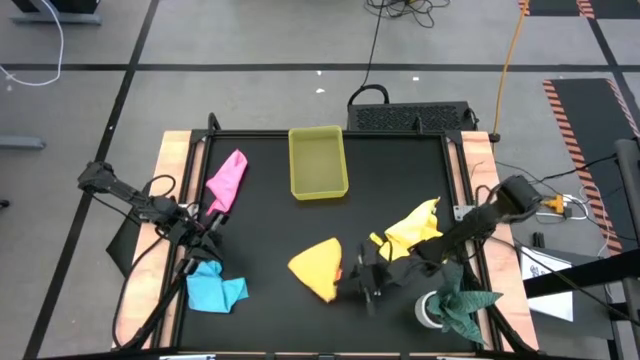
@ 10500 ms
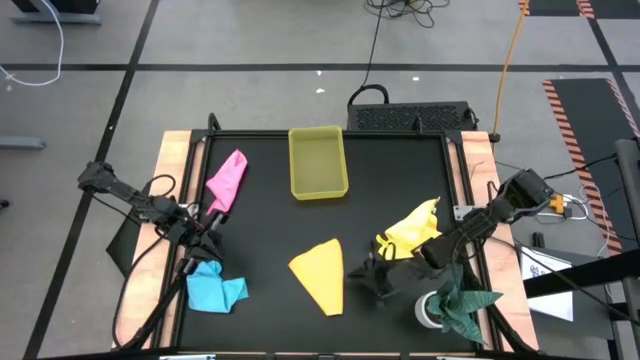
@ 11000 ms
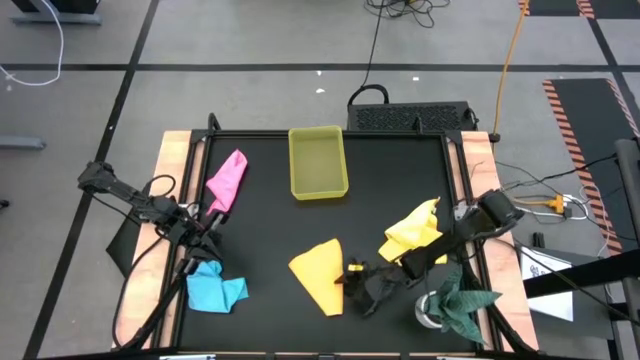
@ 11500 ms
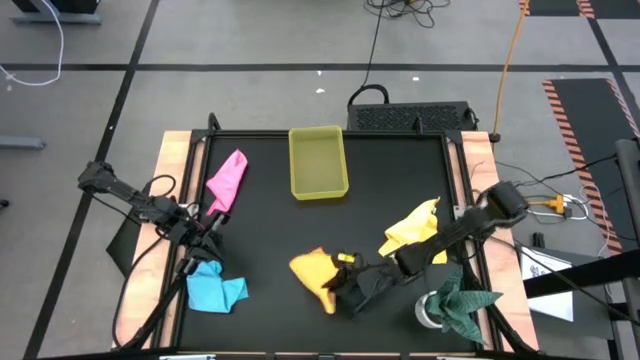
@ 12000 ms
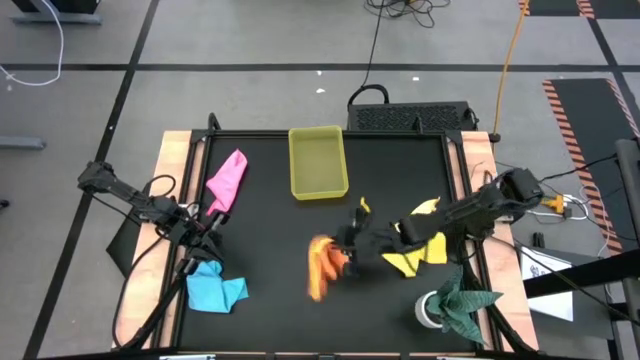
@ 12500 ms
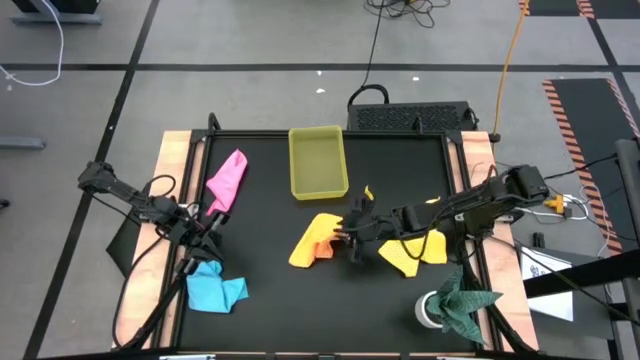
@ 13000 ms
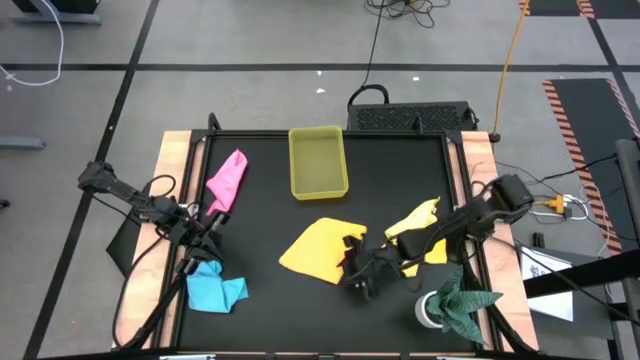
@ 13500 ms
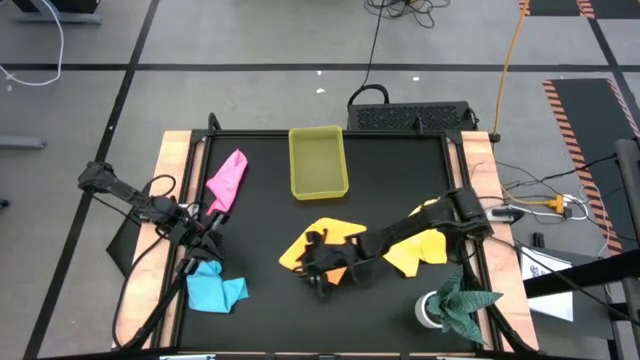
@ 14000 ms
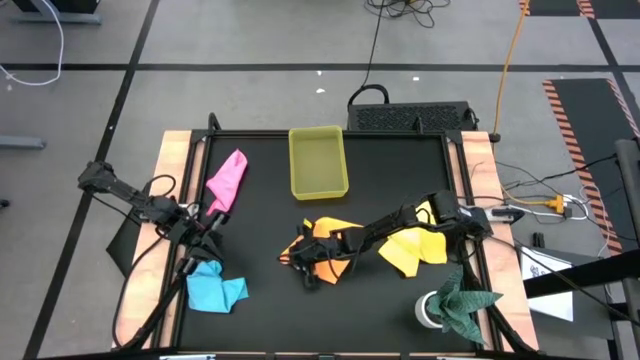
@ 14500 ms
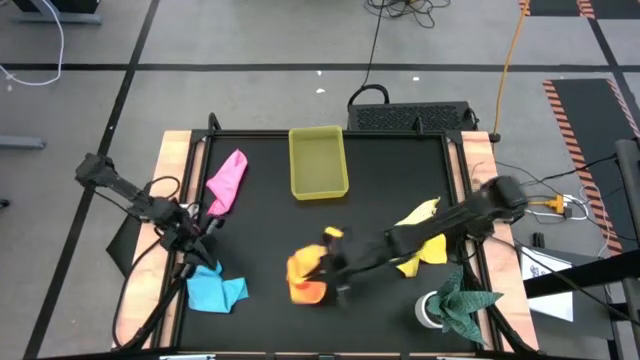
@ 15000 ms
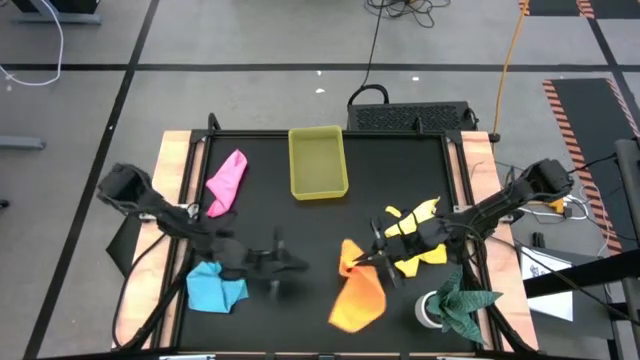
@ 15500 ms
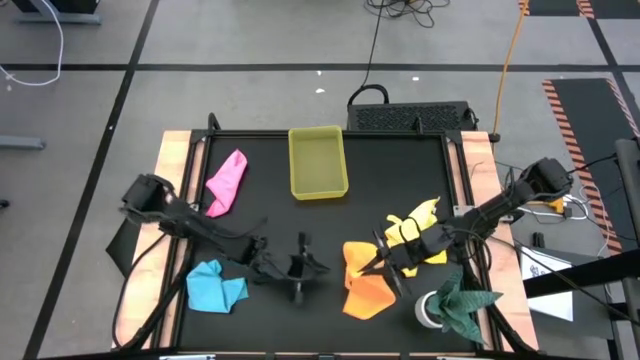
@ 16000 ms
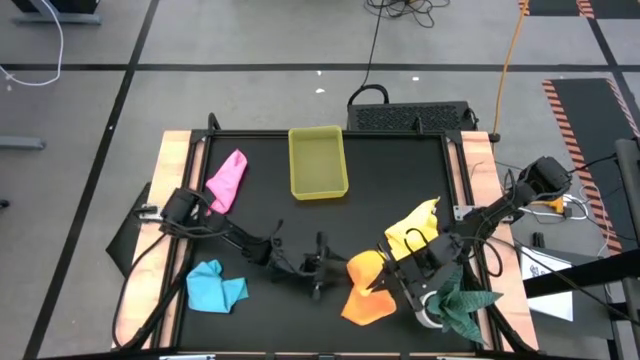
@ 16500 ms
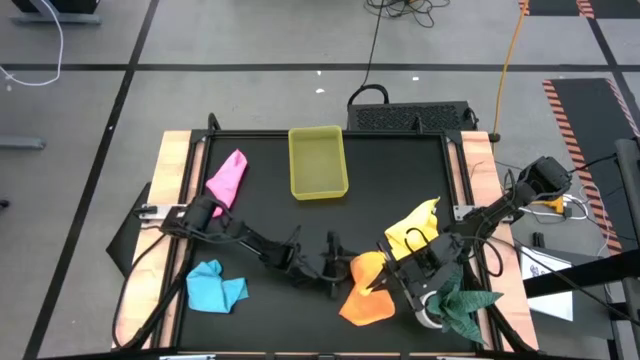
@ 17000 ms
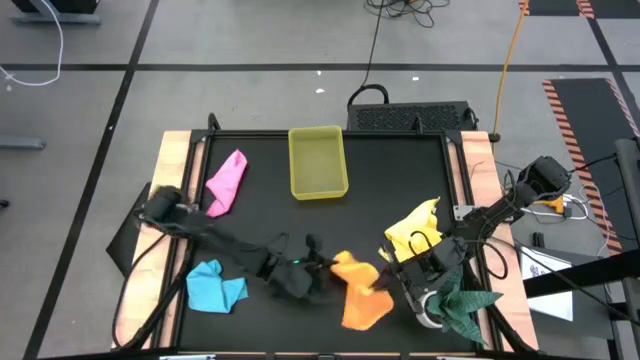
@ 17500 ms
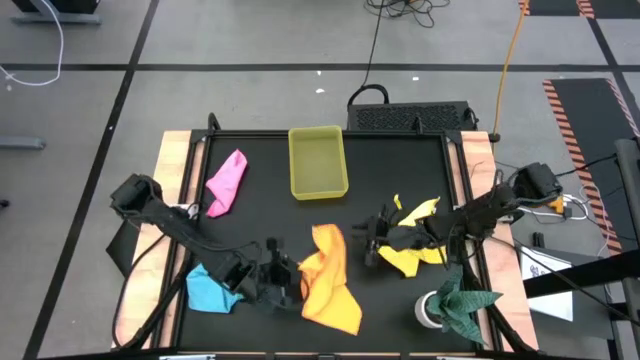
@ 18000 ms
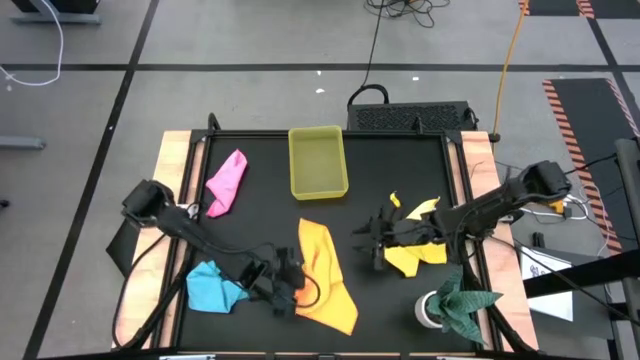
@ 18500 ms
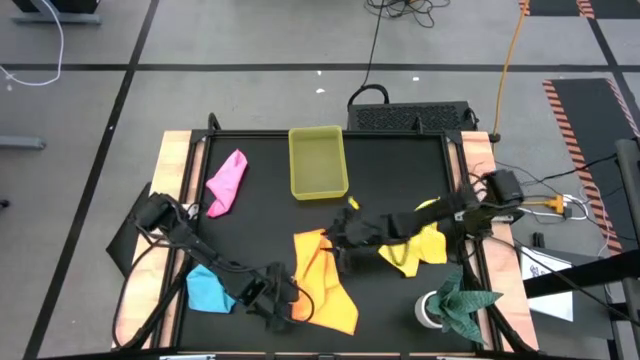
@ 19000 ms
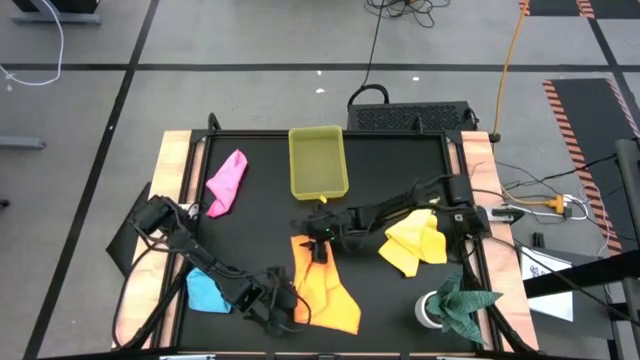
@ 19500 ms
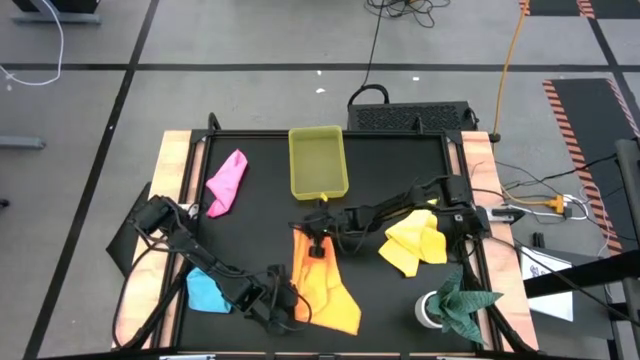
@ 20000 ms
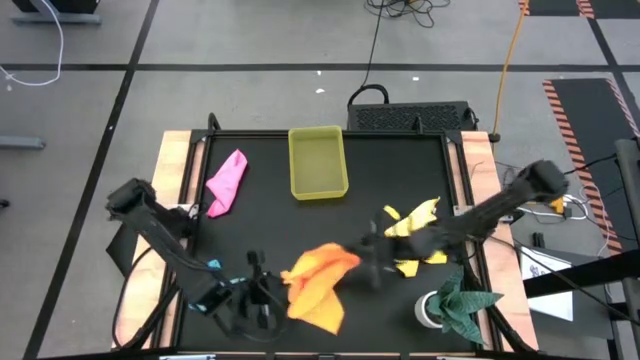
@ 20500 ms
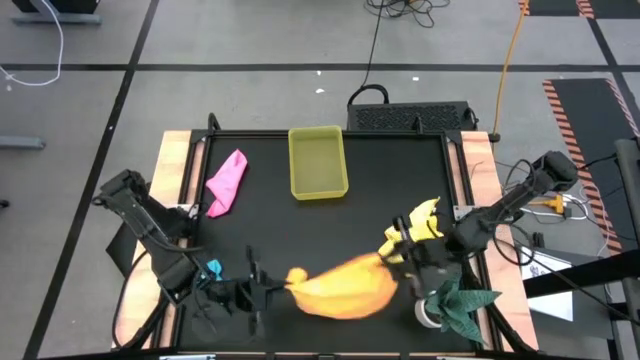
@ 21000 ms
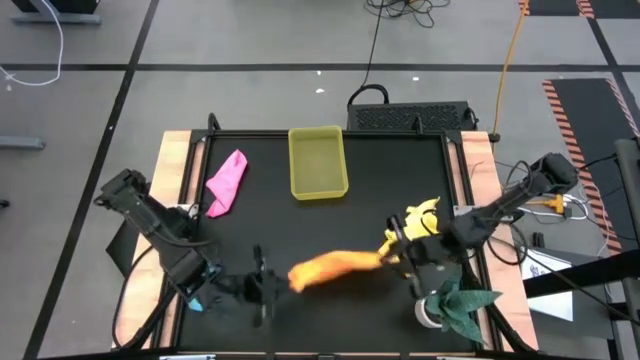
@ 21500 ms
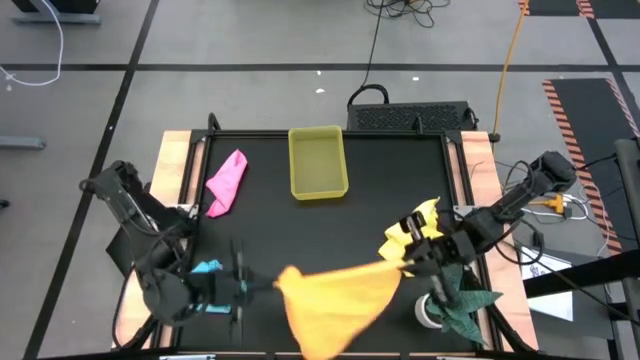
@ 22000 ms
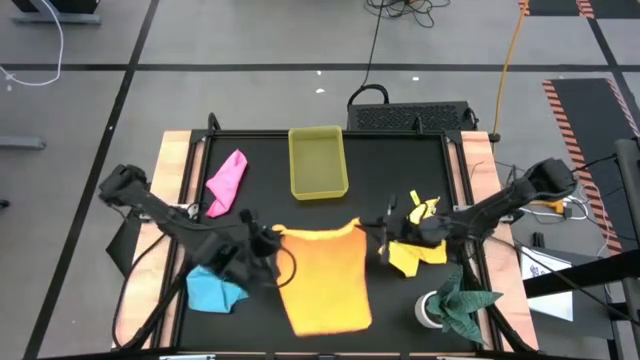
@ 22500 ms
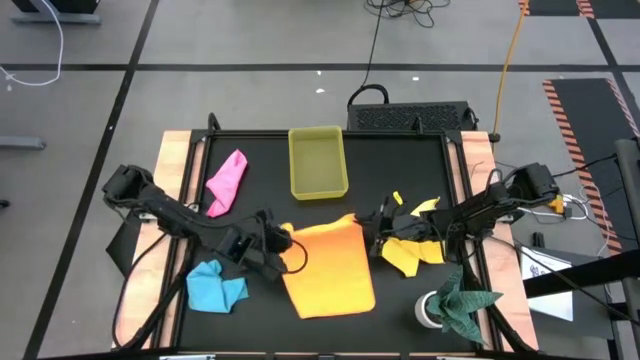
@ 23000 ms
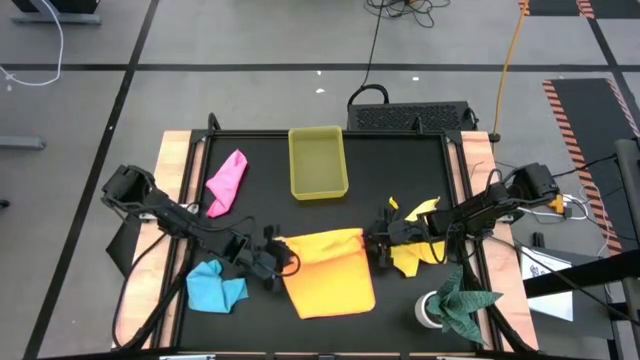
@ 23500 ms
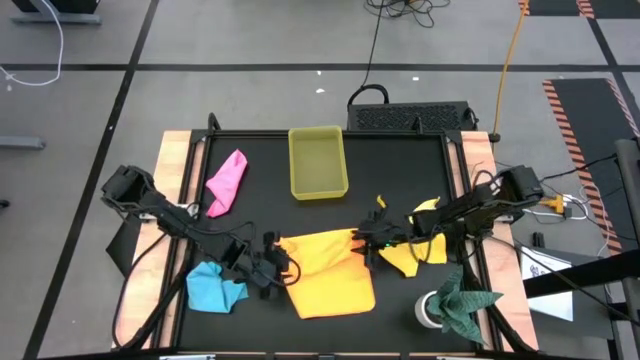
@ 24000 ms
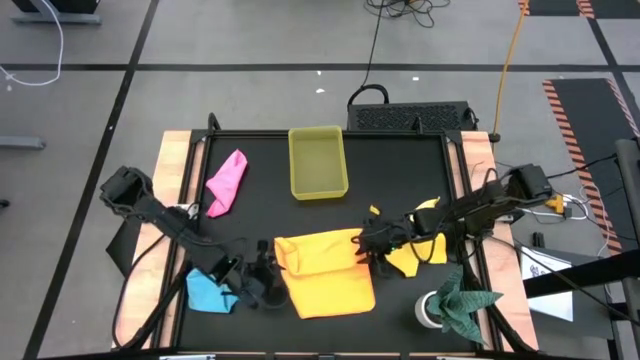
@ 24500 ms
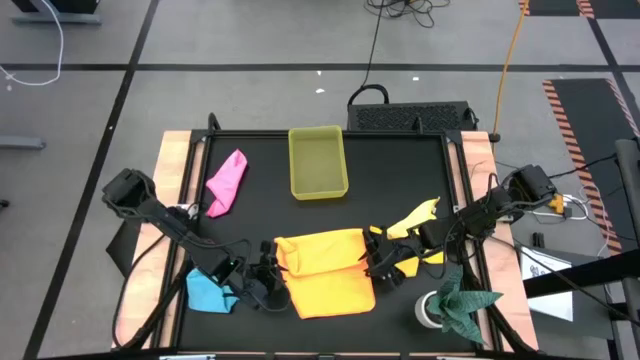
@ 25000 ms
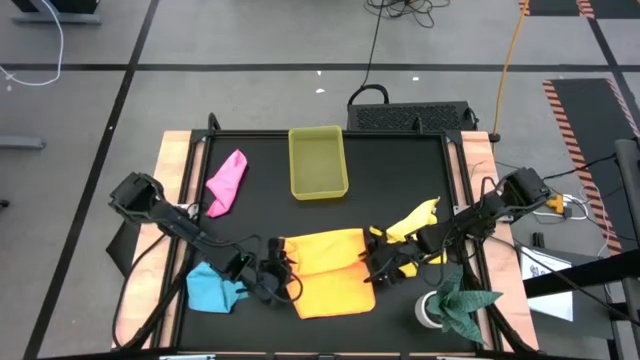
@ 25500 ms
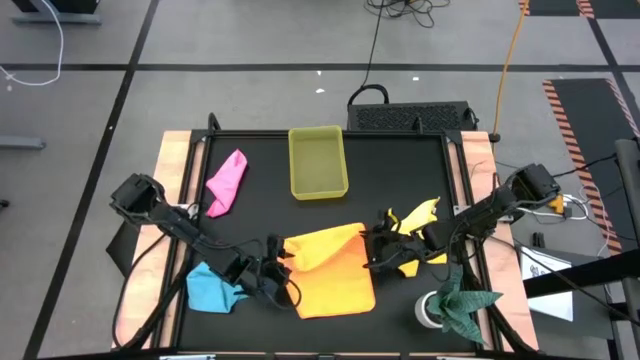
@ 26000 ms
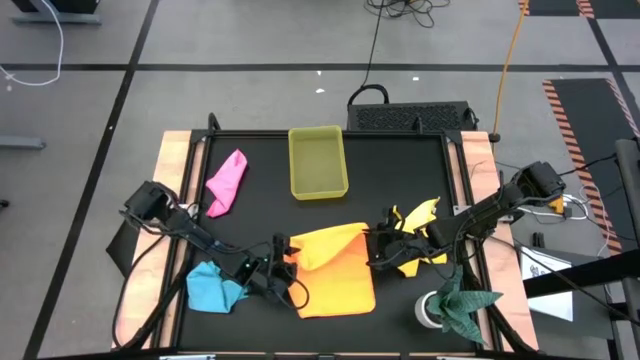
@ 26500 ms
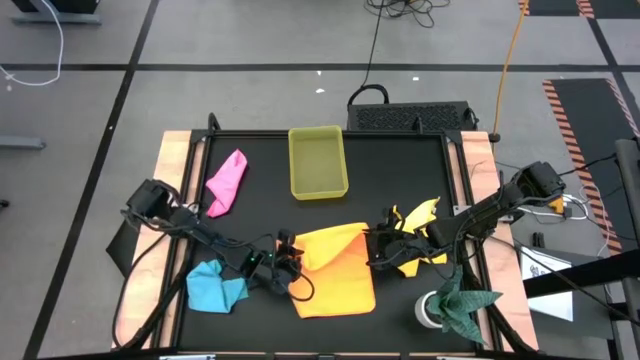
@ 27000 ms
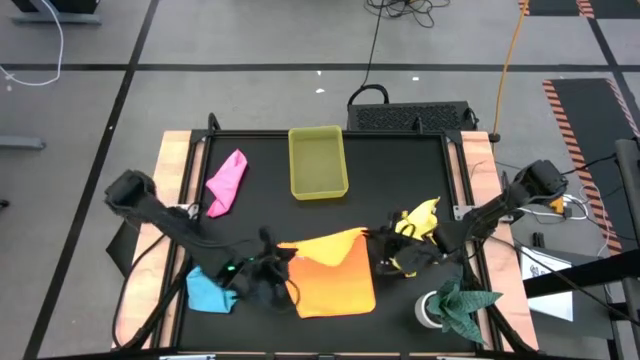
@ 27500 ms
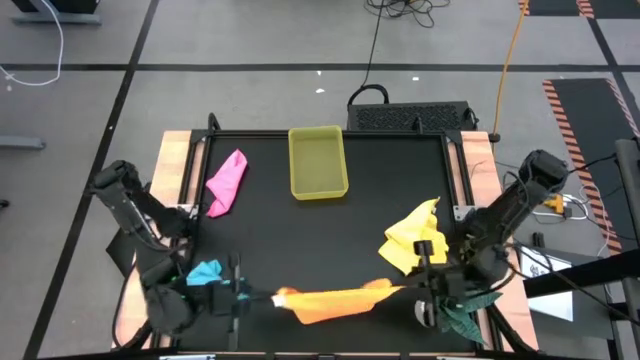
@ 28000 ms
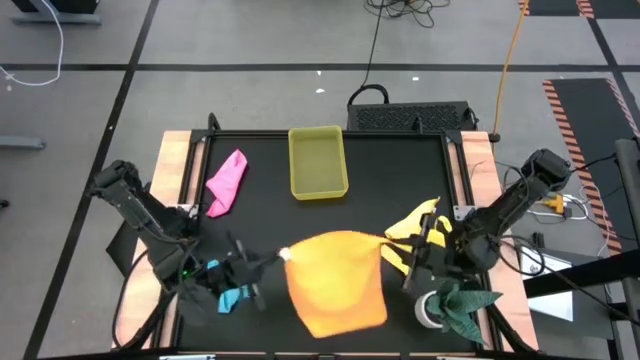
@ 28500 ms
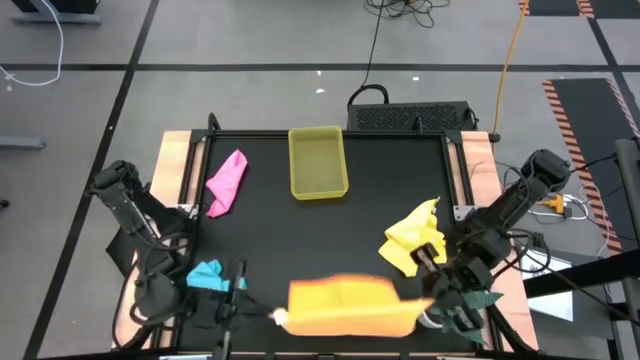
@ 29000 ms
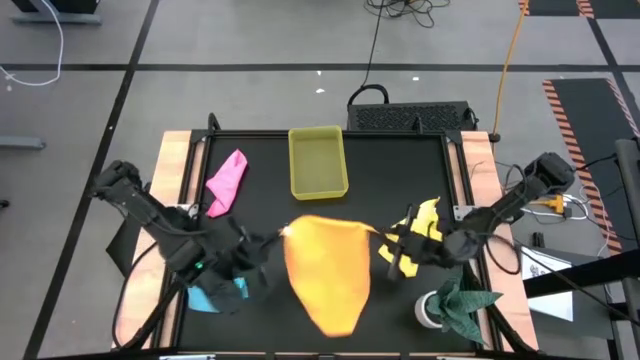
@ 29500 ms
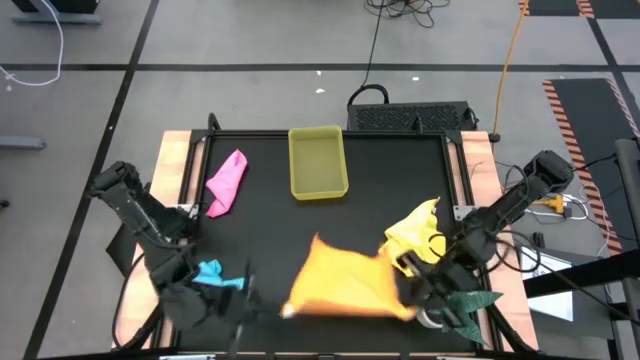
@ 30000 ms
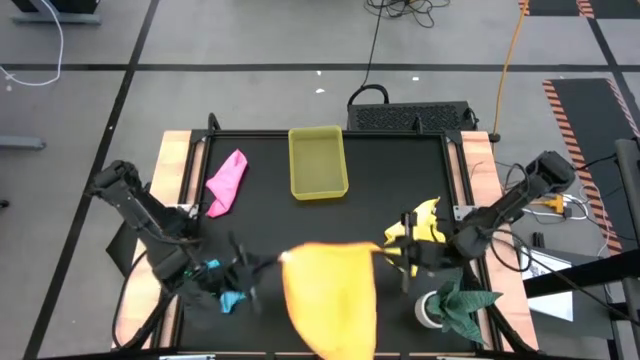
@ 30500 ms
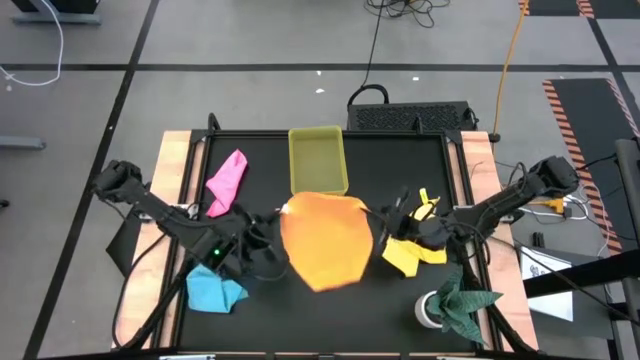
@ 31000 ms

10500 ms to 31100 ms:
Task: Fold microfiber towels
Fold the orange towel
